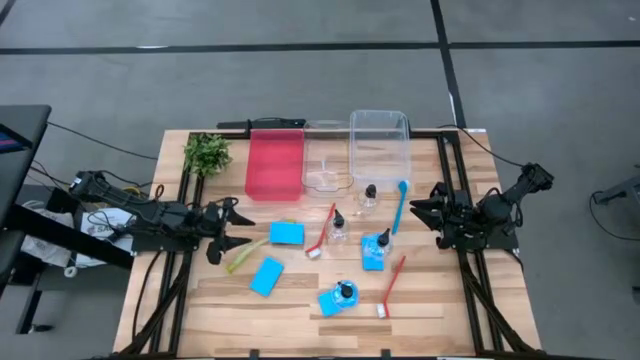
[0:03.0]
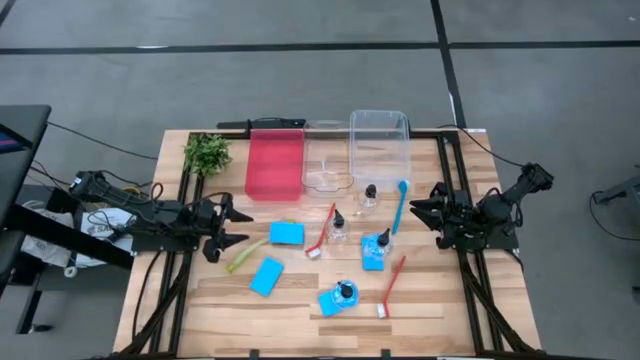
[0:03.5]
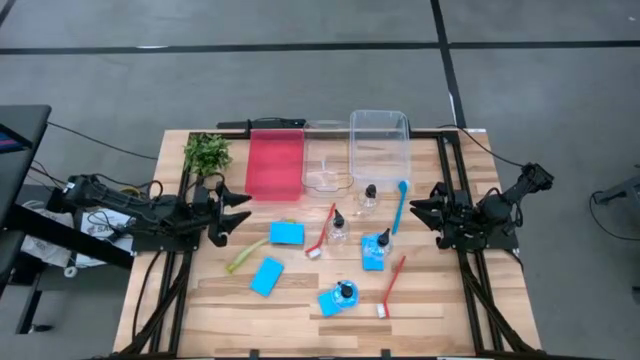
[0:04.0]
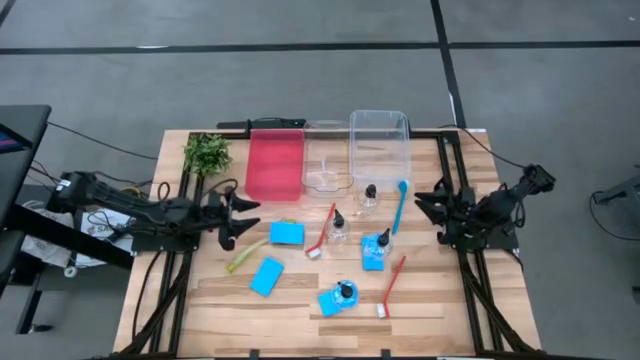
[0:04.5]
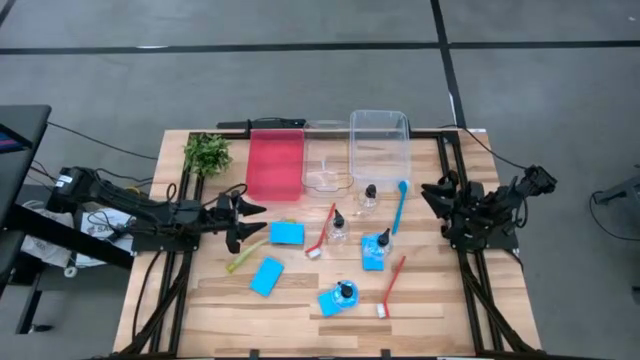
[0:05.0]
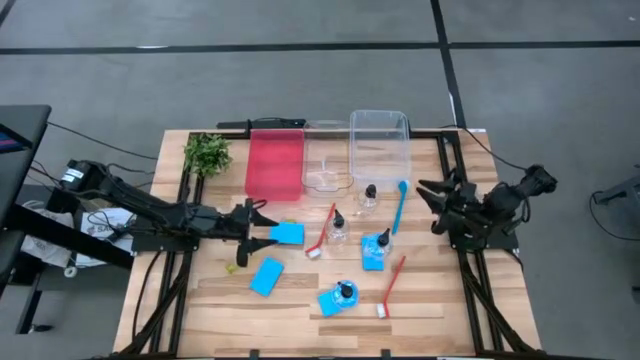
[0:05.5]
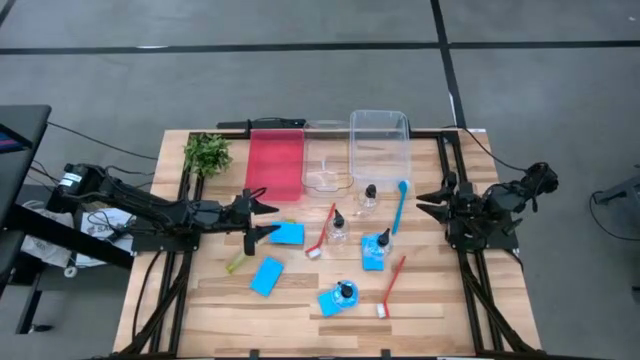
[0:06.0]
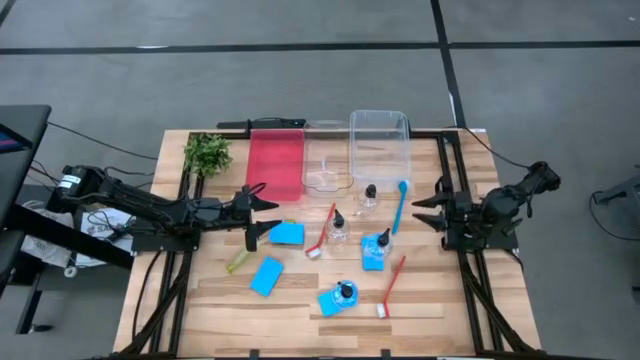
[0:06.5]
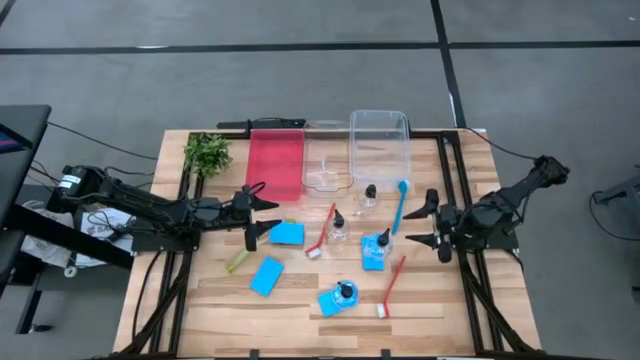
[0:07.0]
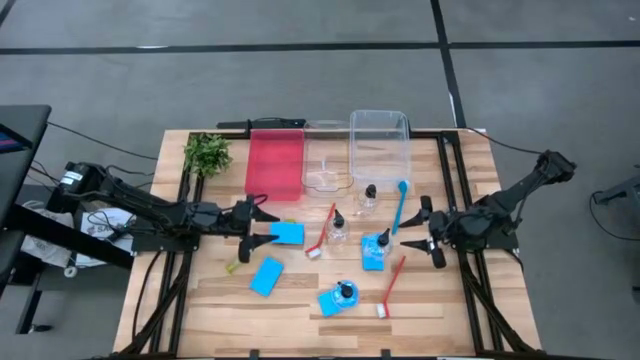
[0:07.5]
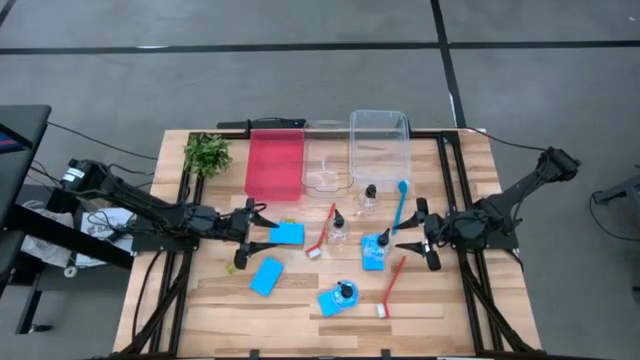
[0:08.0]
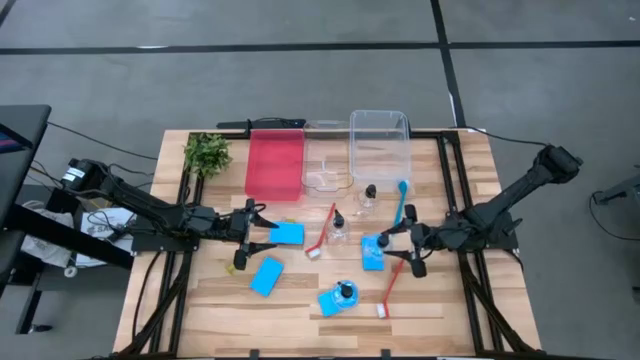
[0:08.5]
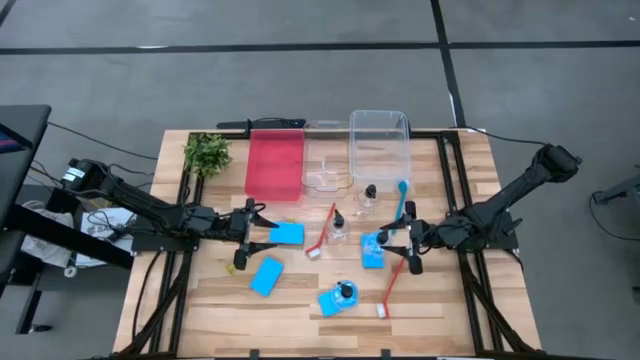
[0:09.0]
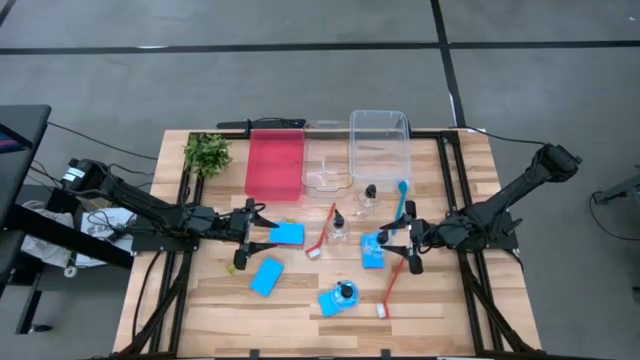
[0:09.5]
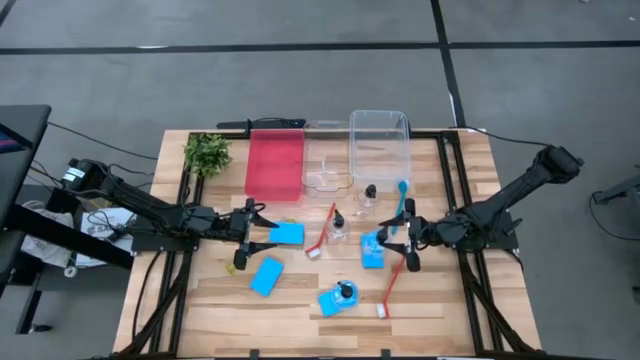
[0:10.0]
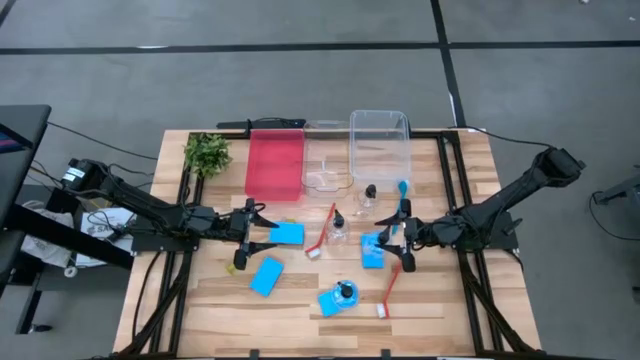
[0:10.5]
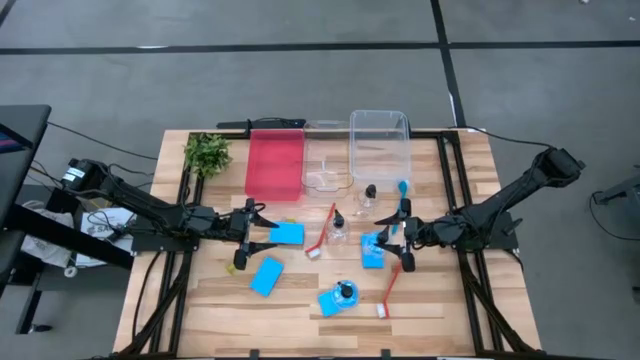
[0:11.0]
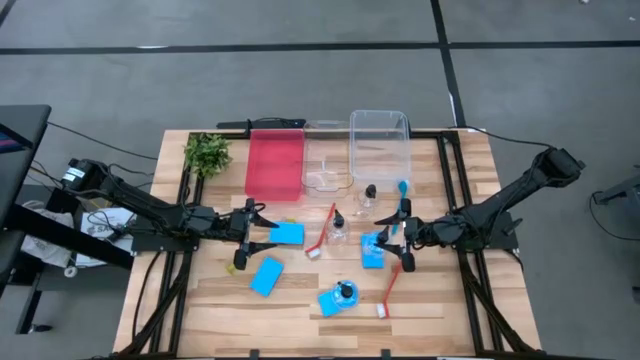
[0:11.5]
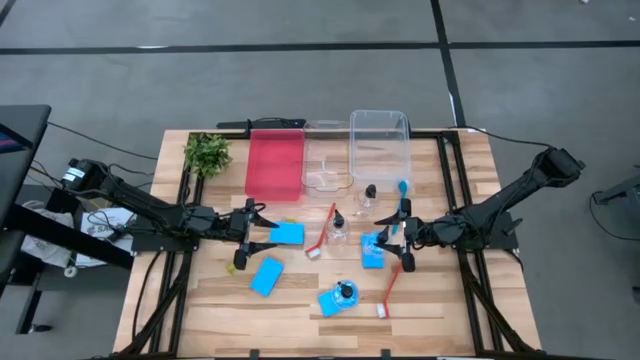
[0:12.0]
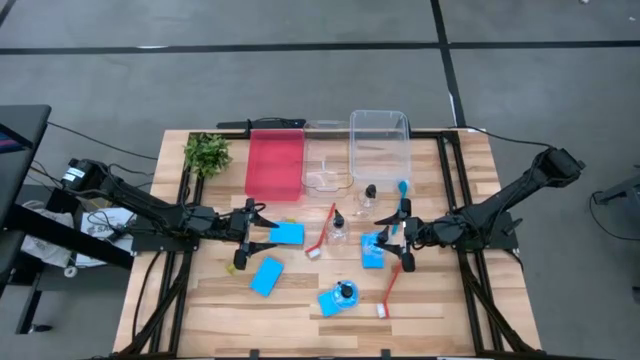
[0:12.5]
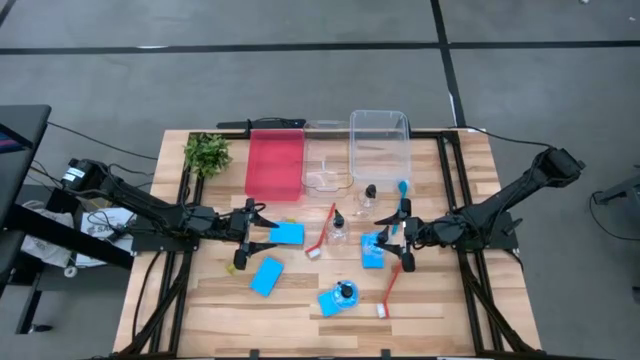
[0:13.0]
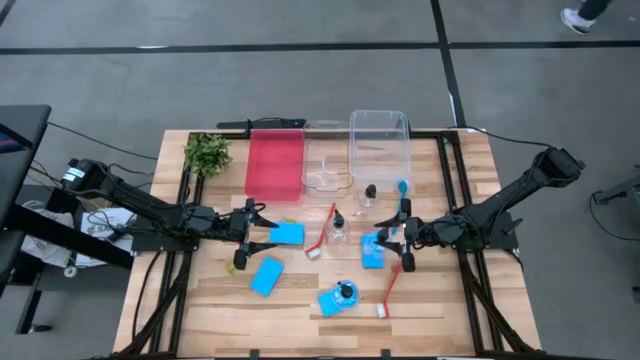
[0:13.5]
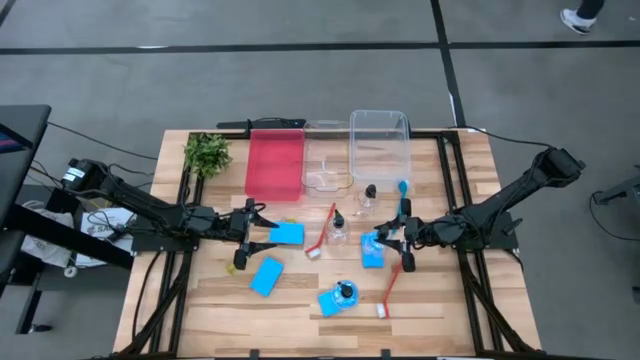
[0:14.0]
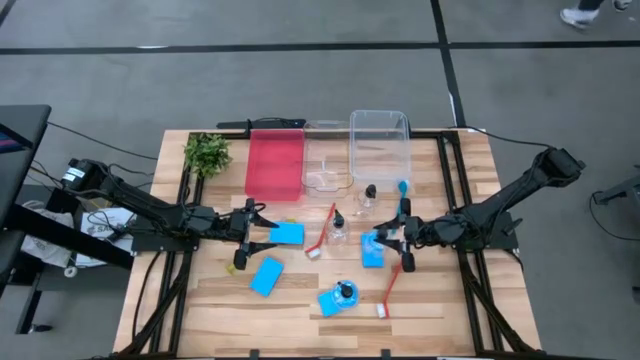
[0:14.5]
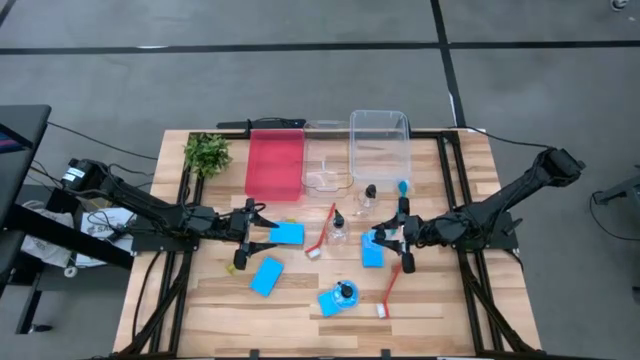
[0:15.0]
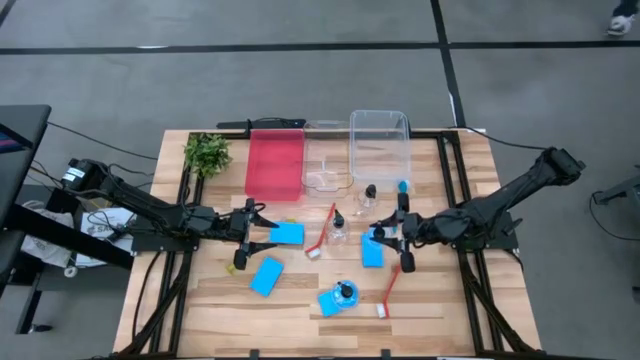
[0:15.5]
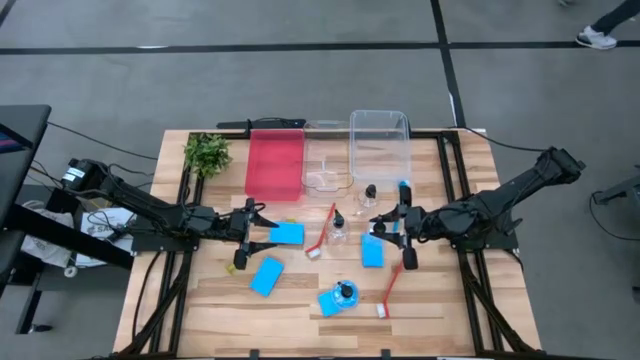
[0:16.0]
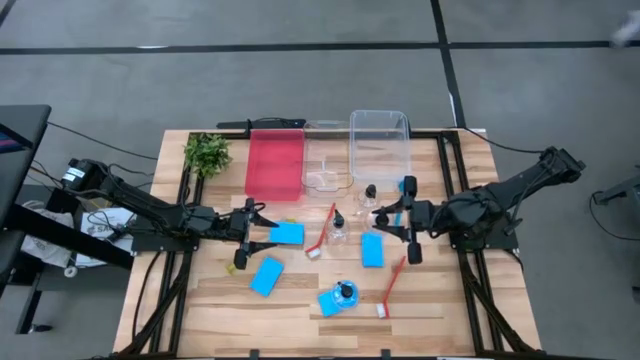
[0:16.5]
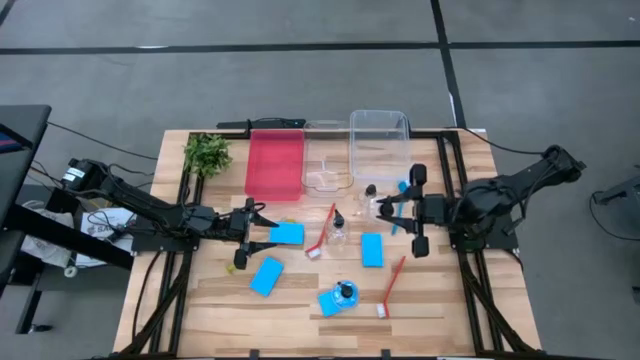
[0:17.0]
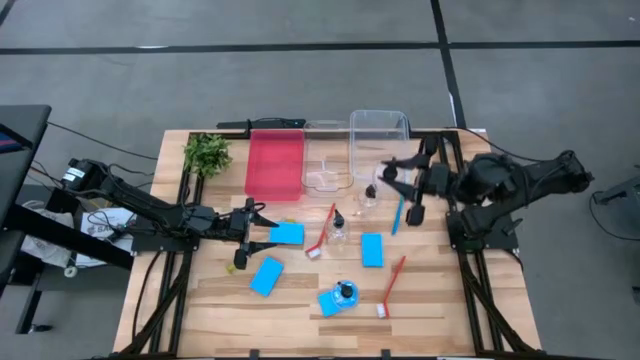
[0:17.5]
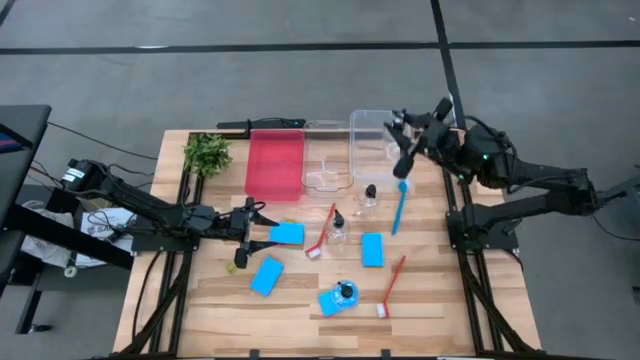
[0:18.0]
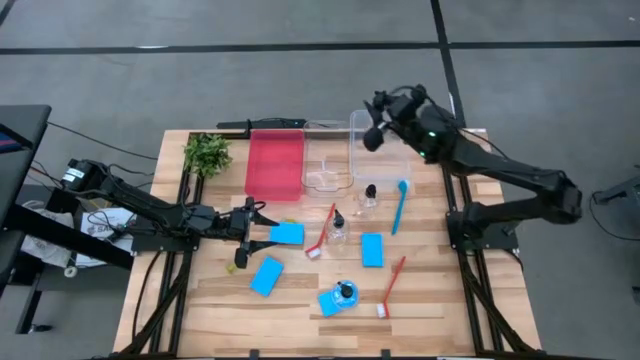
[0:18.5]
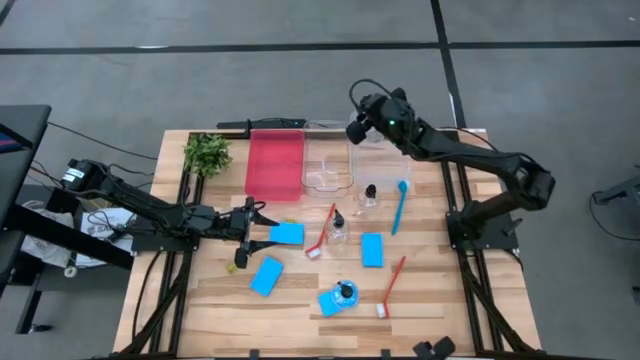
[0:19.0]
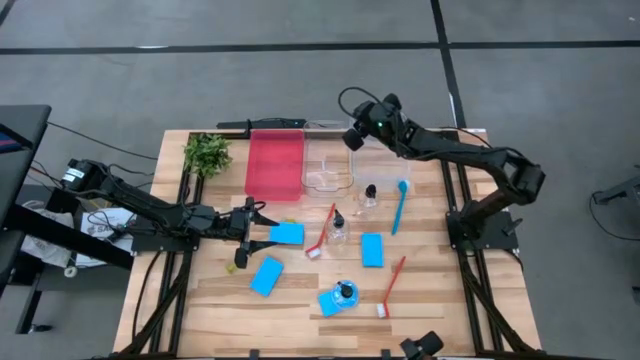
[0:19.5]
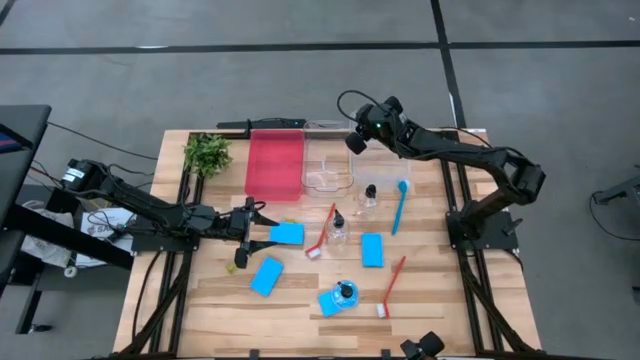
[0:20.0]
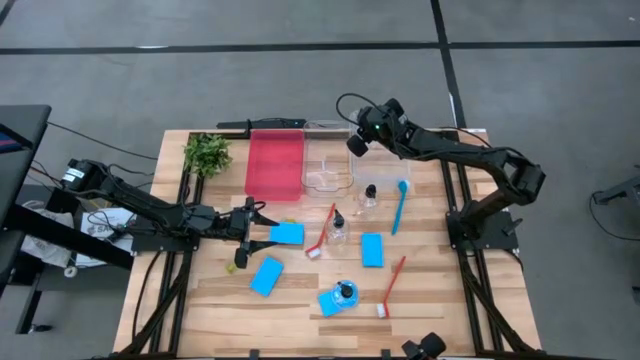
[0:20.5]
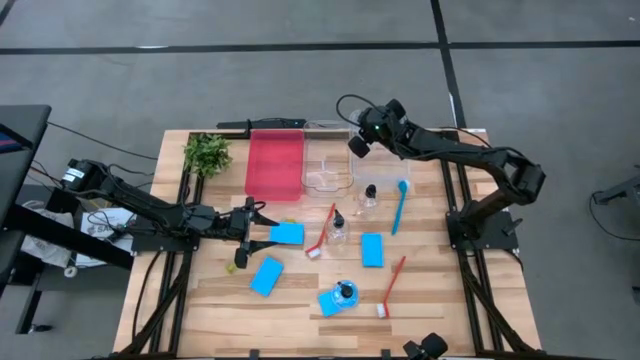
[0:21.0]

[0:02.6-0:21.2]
Task: Pick & Place Kitchen Sink Supplies
Put the middle right soap dispenser into the right transparent bin

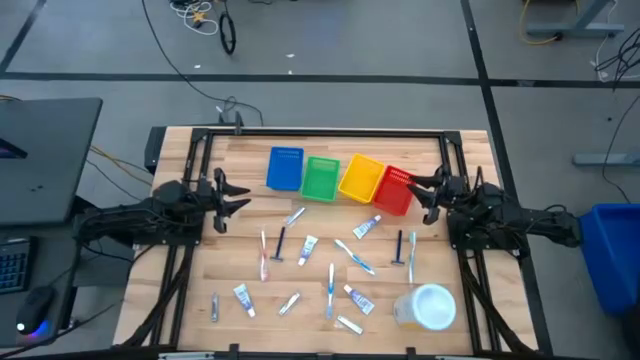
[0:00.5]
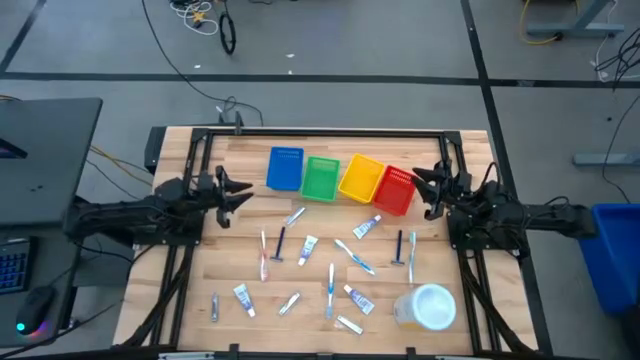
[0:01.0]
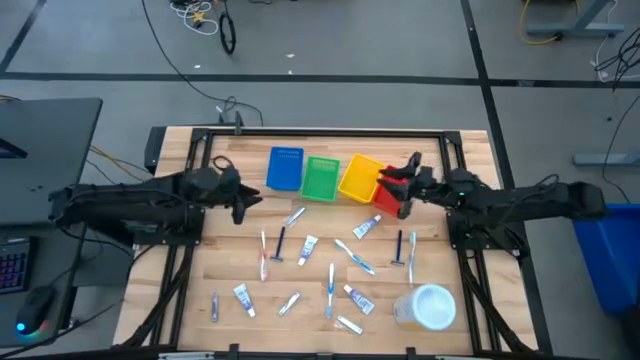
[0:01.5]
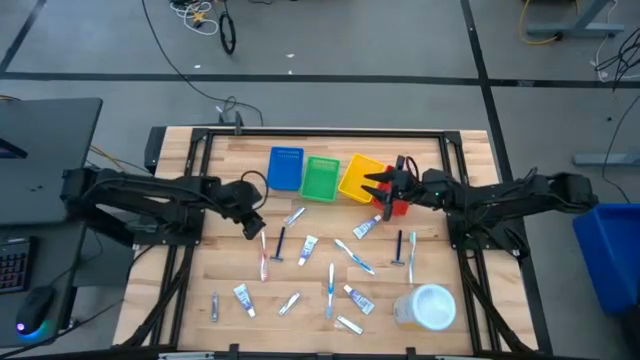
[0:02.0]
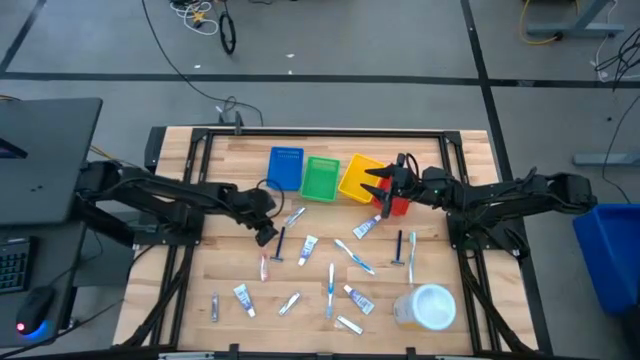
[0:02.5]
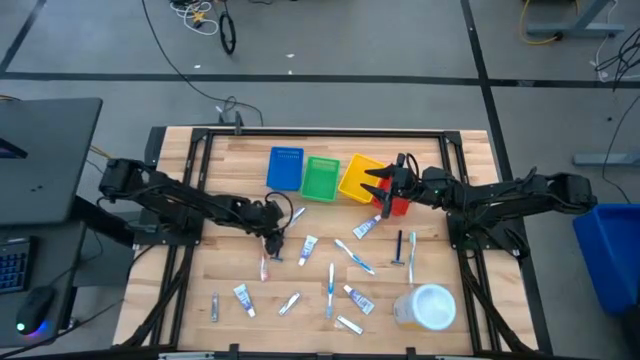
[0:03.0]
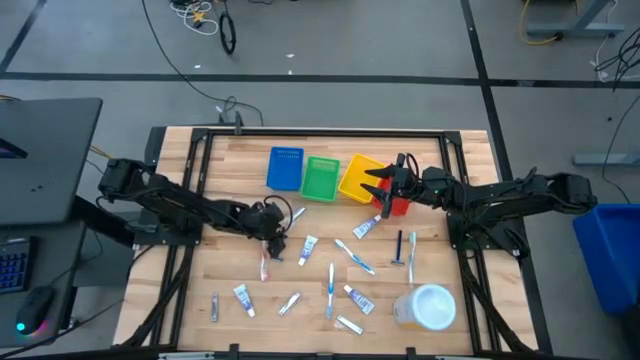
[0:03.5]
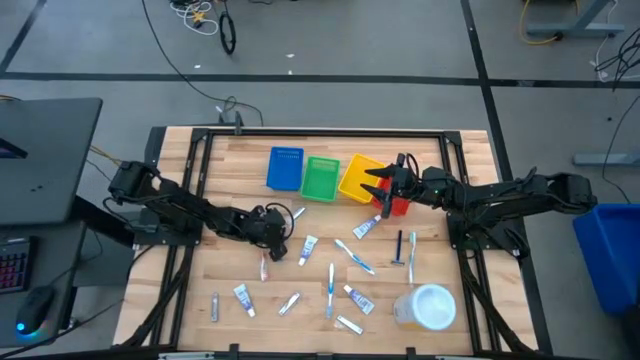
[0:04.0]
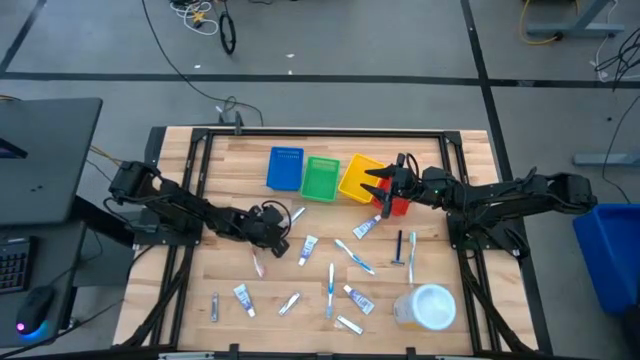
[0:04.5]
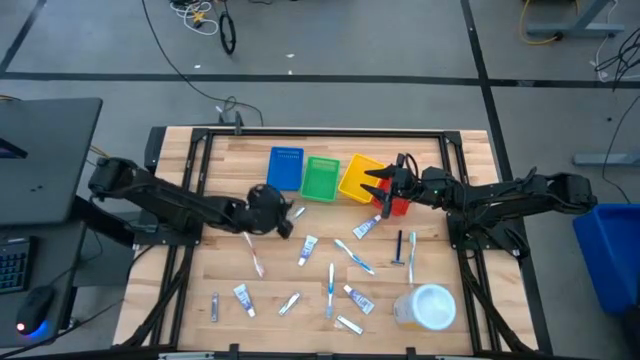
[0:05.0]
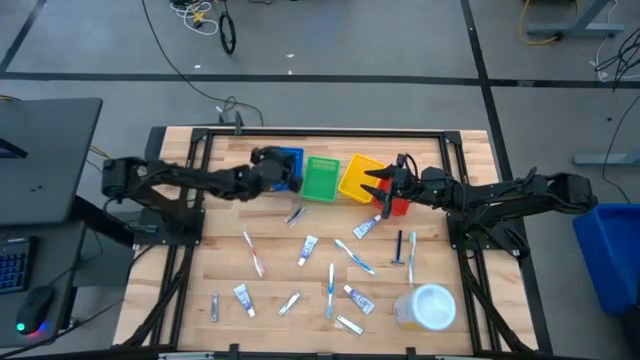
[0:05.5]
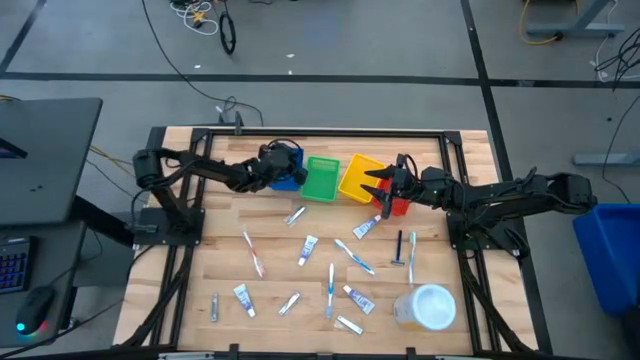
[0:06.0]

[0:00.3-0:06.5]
Task: Pick & Place Travel size toiletries
Put the left blue razor into the blue bin
